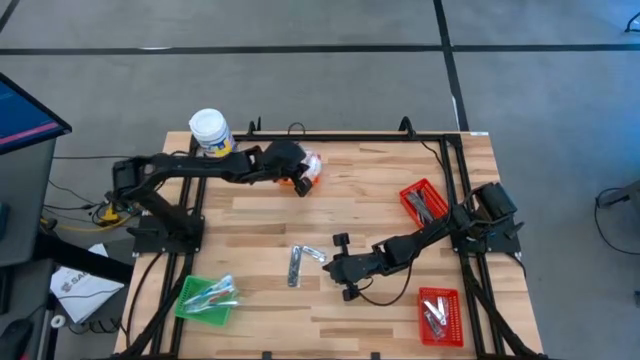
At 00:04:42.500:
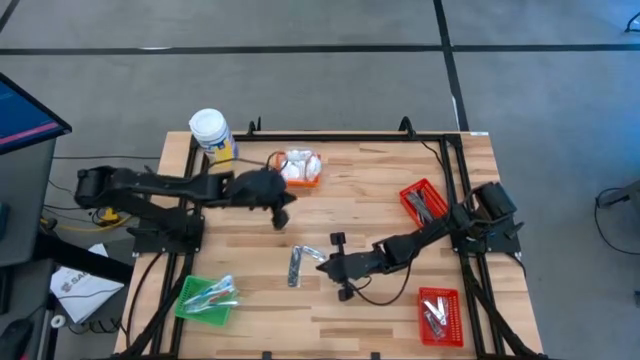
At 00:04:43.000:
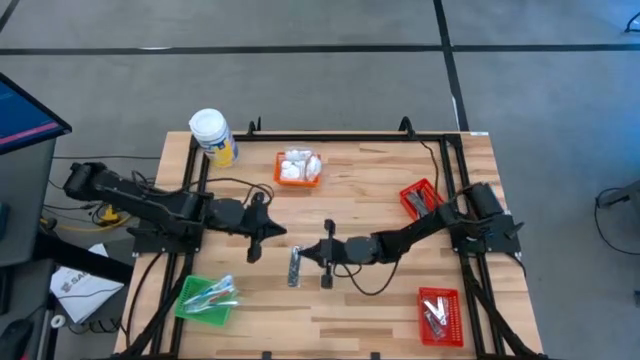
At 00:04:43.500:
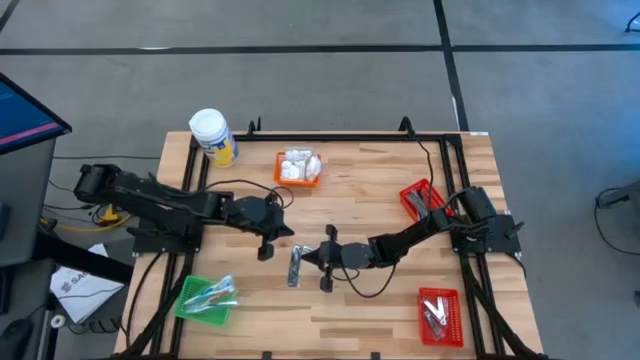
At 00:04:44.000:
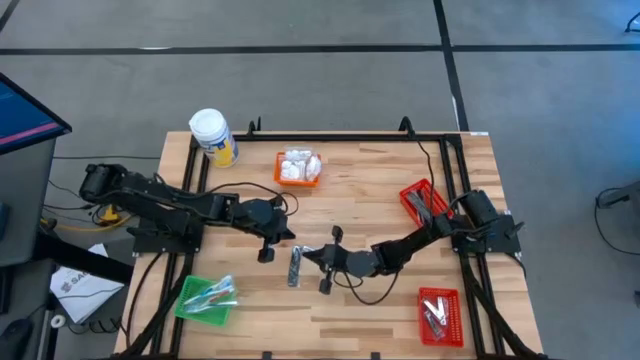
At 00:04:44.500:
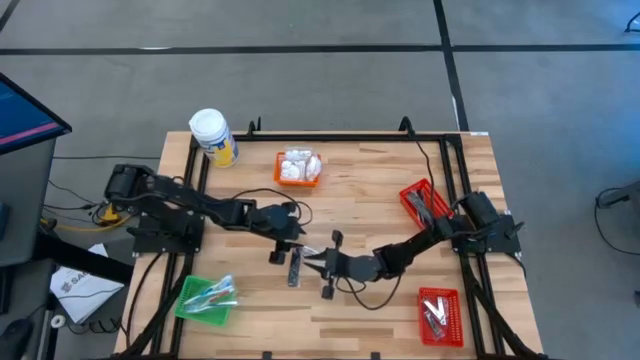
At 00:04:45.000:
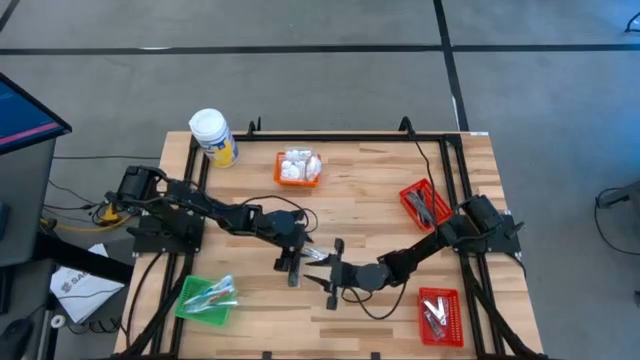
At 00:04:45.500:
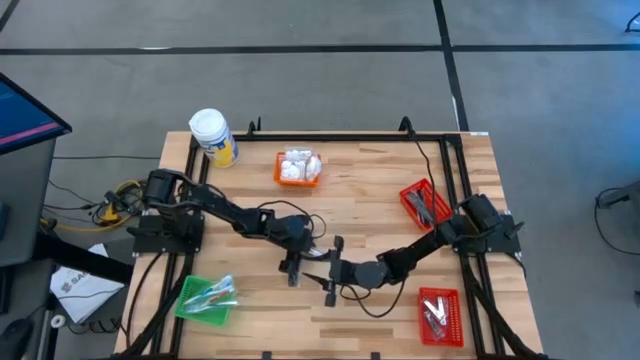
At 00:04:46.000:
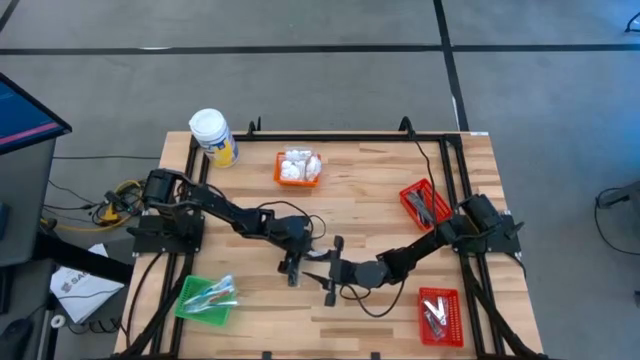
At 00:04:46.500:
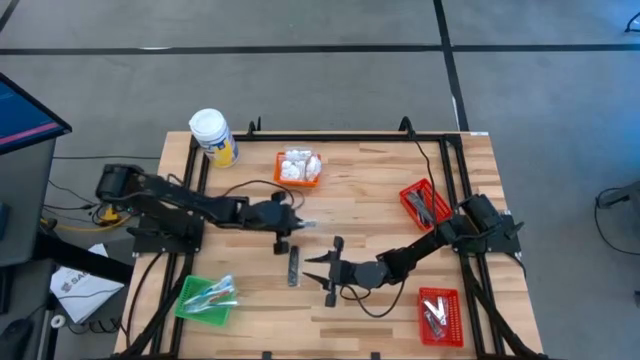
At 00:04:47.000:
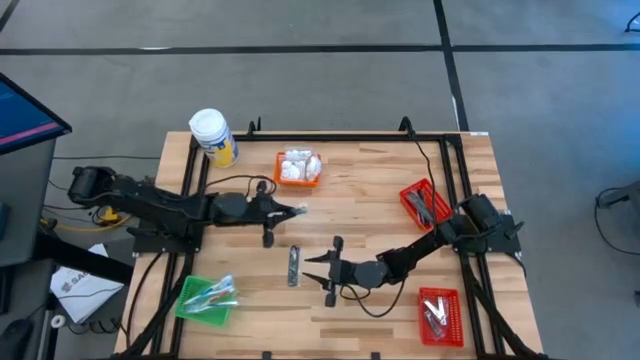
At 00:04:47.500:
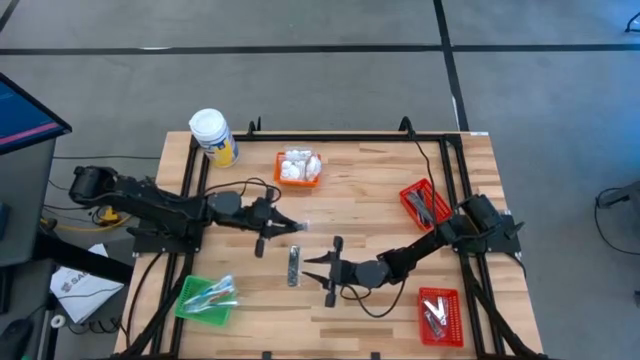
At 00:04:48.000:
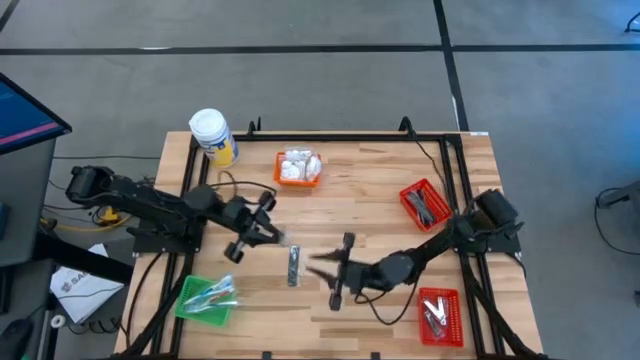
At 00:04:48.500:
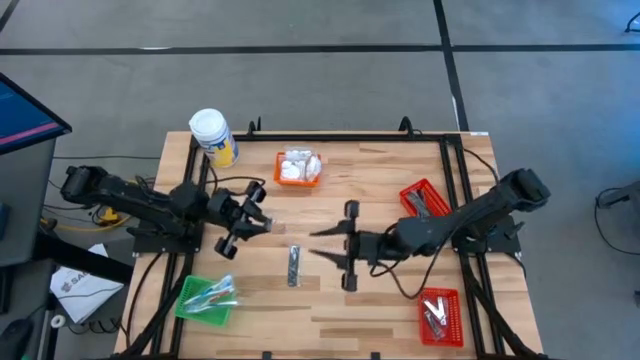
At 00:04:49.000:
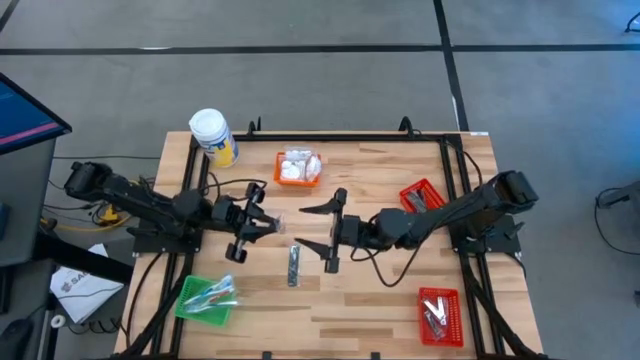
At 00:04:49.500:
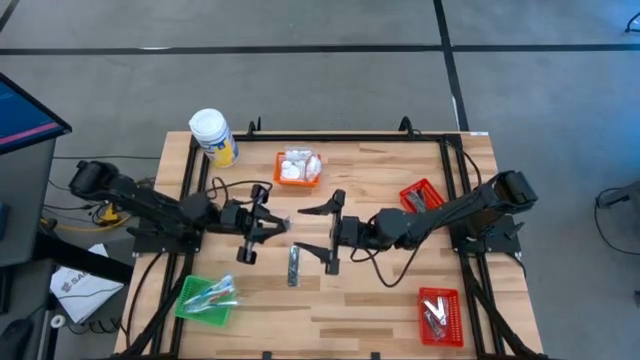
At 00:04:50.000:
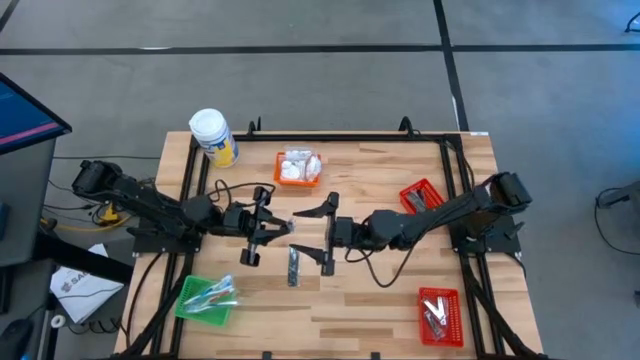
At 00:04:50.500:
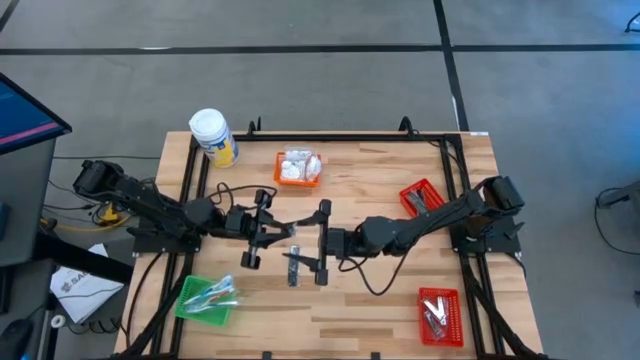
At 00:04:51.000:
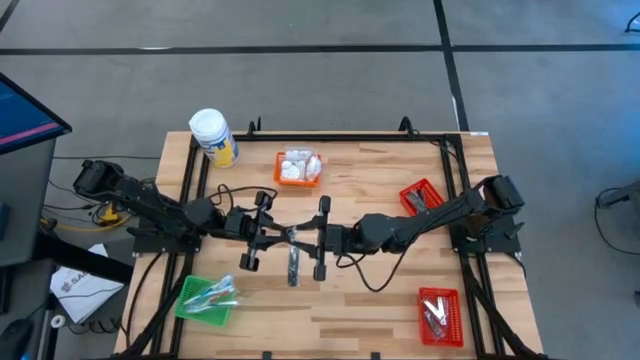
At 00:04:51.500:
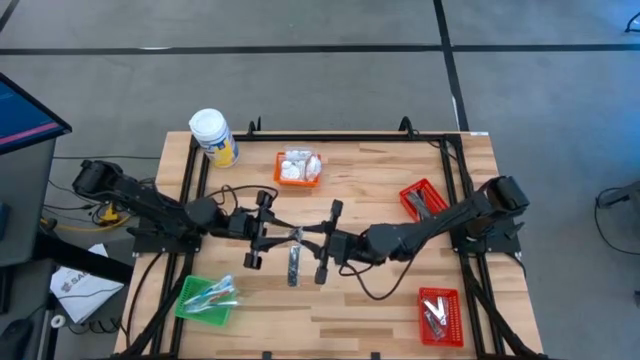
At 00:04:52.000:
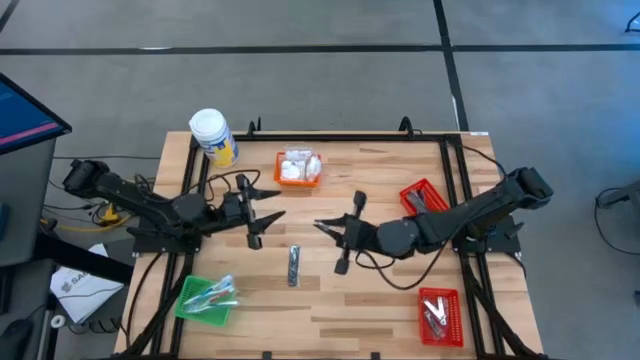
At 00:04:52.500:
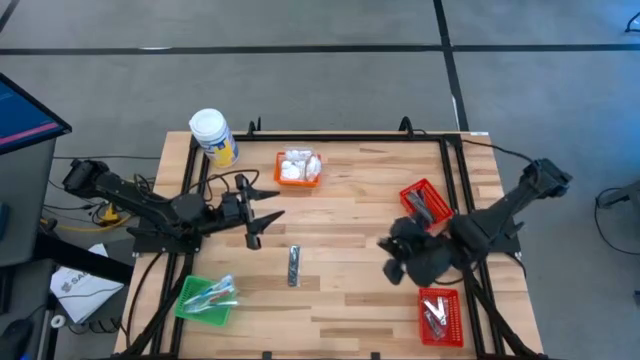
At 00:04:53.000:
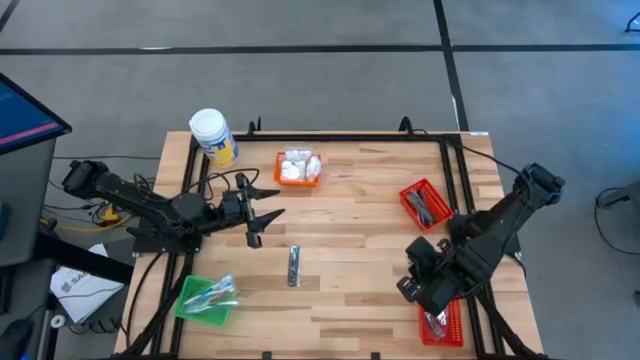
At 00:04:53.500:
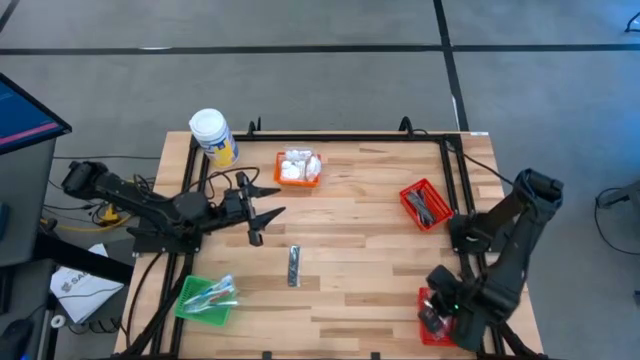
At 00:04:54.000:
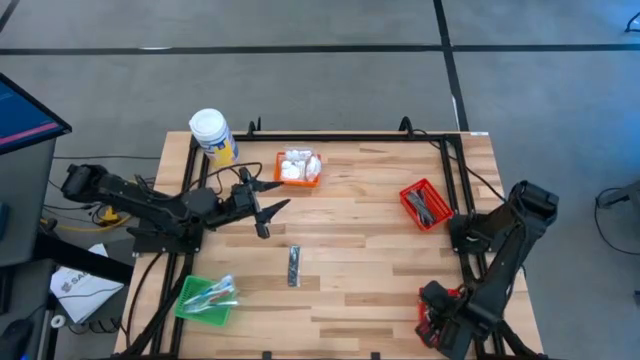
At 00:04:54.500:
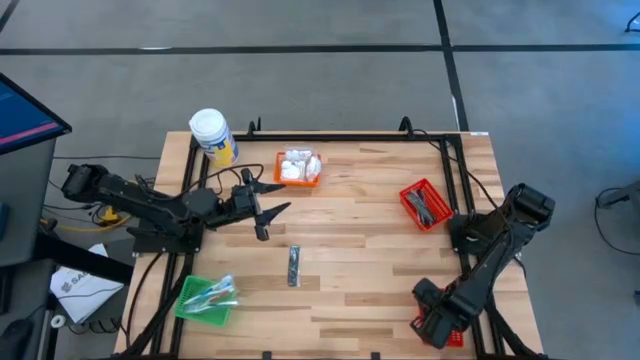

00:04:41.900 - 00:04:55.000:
Task: Pick & Place Travel size toiletries
Put the silver nail cutter into the bottom red basket

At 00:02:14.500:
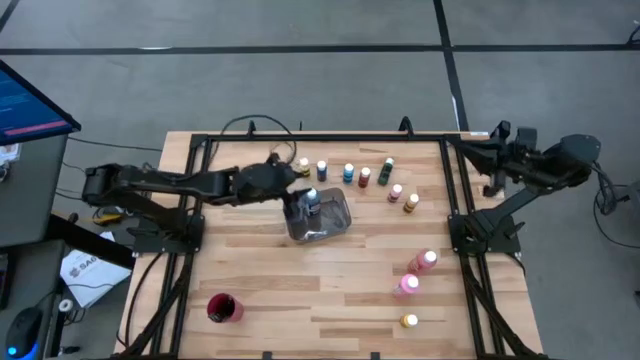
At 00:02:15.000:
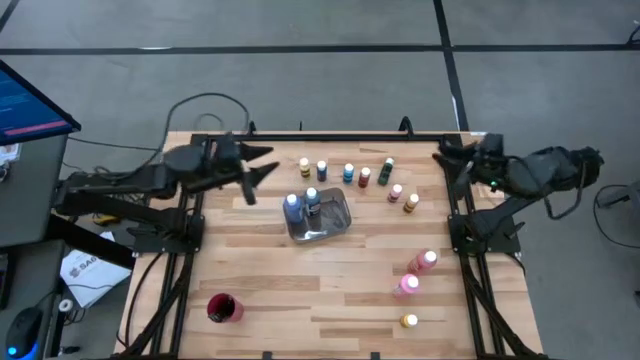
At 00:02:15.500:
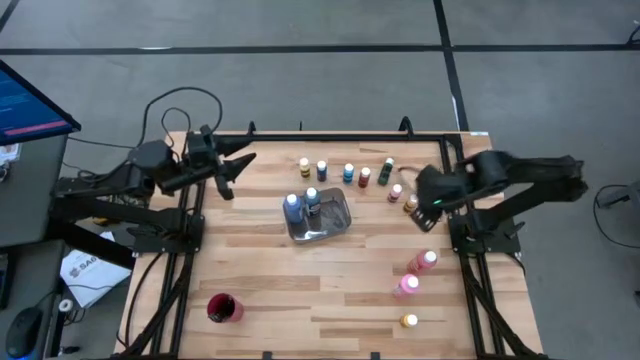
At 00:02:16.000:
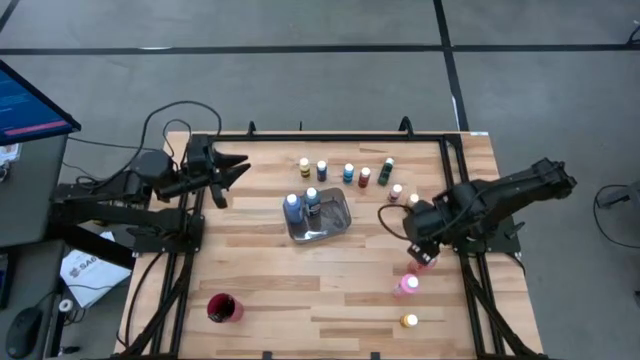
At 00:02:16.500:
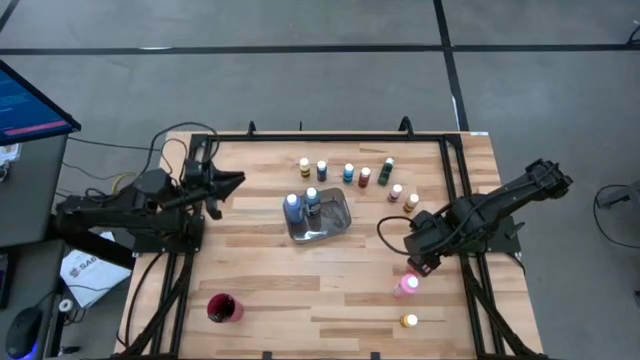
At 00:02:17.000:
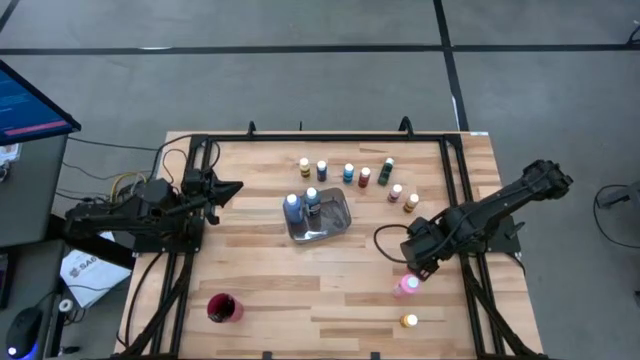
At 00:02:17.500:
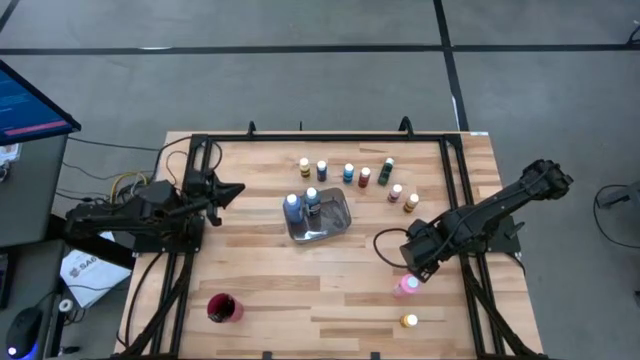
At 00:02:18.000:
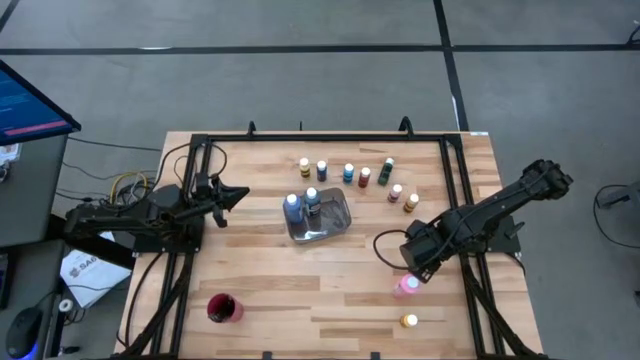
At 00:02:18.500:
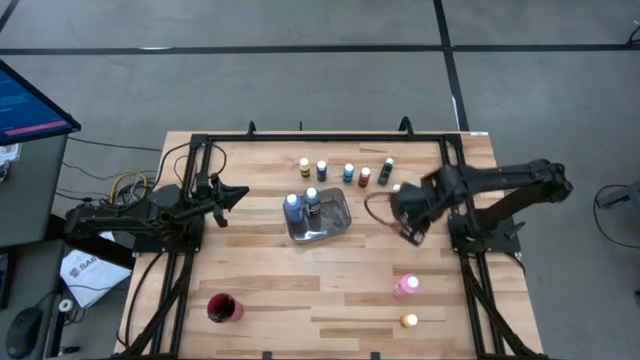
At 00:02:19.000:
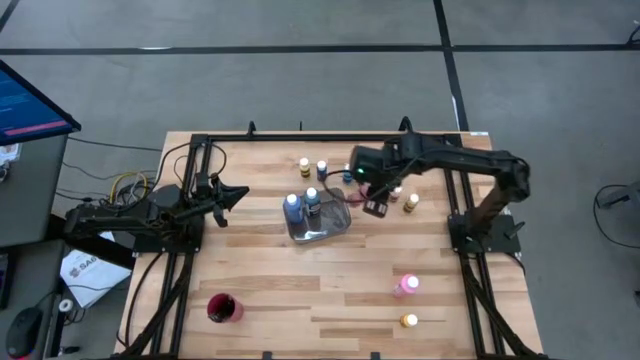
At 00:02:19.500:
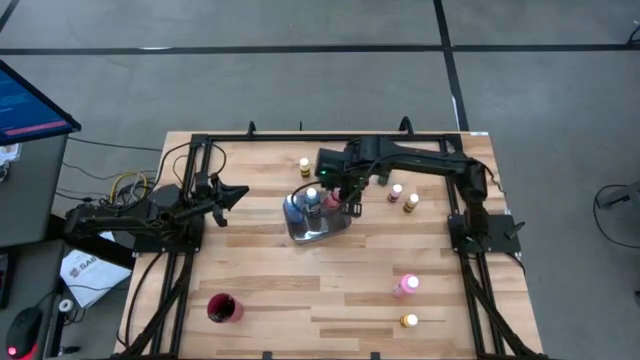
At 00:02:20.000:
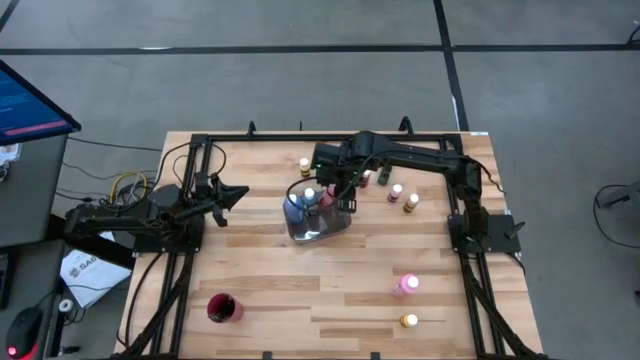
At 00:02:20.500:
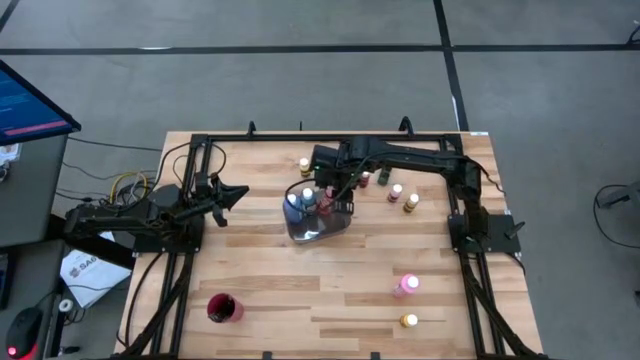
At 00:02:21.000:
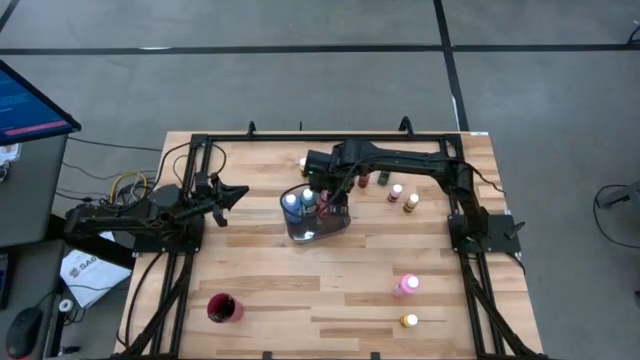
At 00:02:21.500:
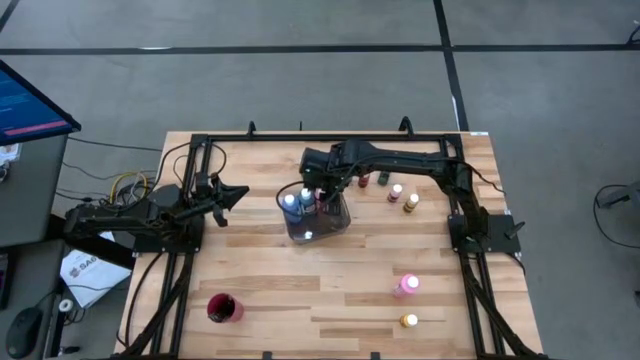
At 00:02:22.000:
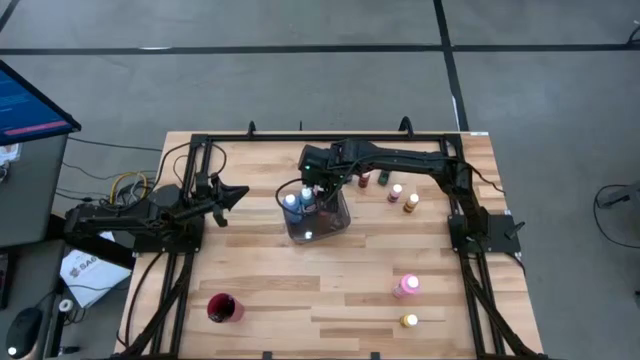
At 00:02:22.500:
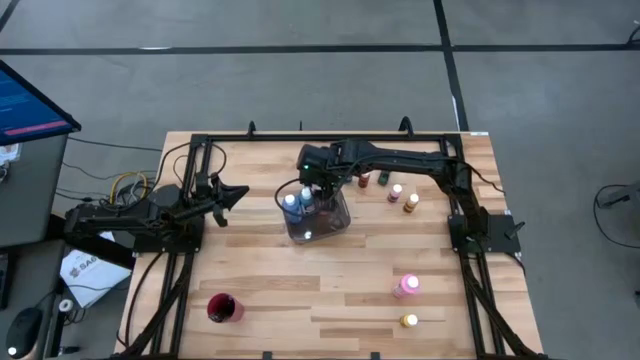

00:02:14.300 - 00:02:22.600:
Task: Pick & Place Paint Supplies
Put the large pink paint bottle into the black bin
